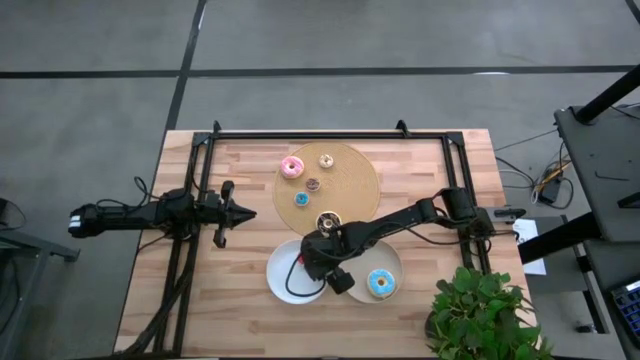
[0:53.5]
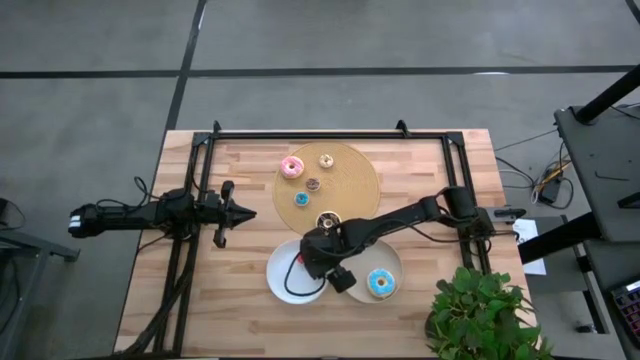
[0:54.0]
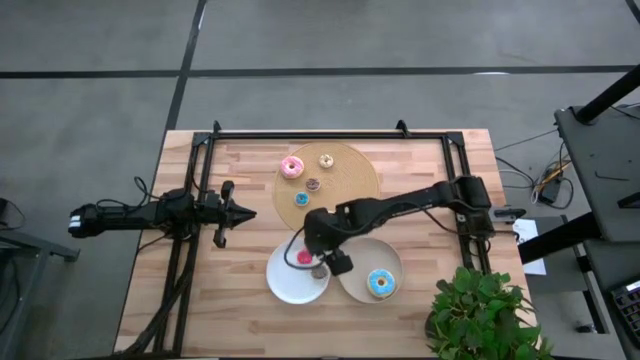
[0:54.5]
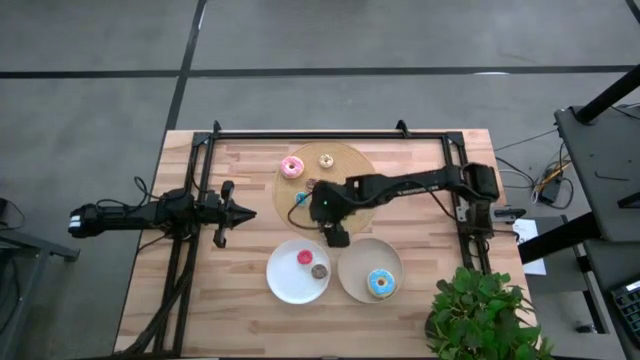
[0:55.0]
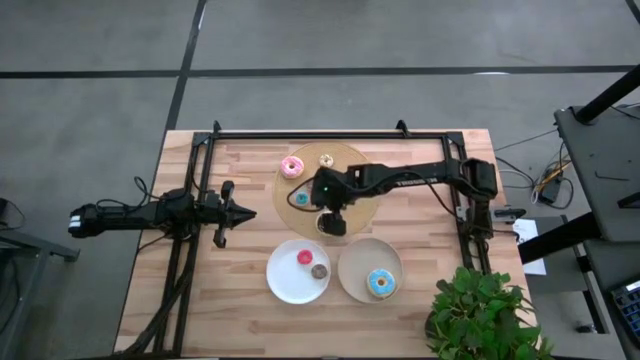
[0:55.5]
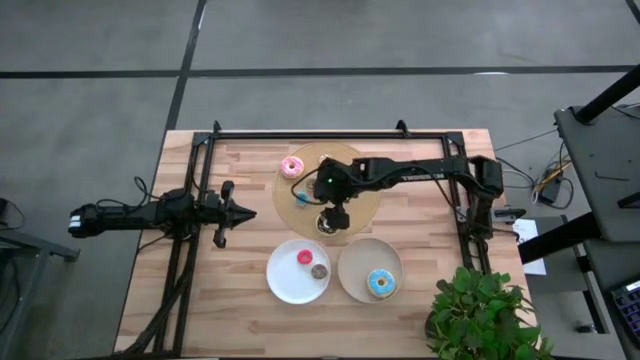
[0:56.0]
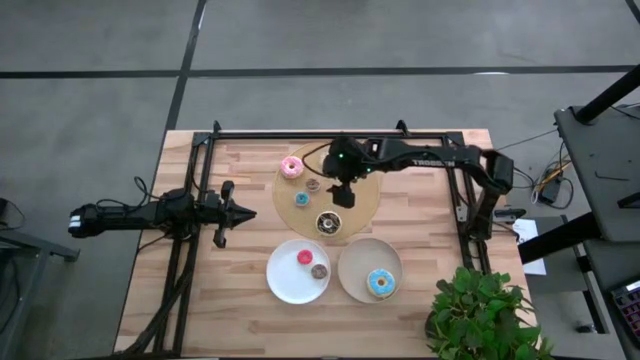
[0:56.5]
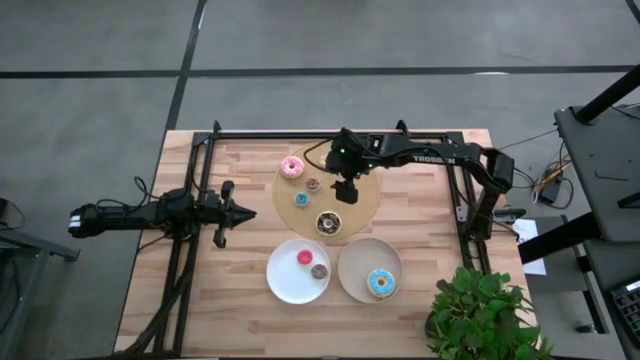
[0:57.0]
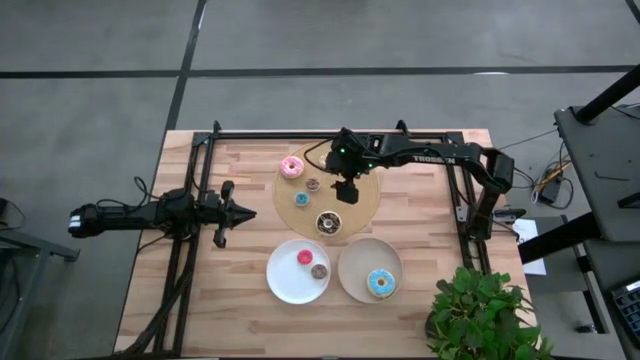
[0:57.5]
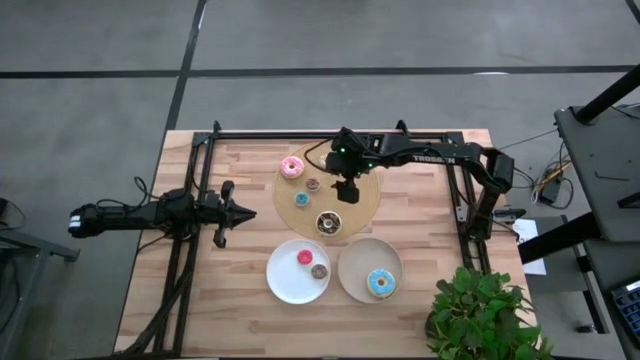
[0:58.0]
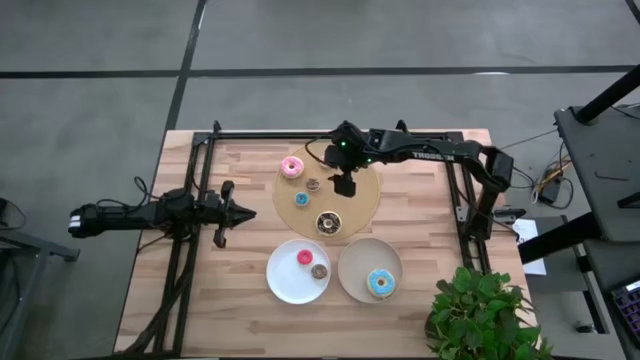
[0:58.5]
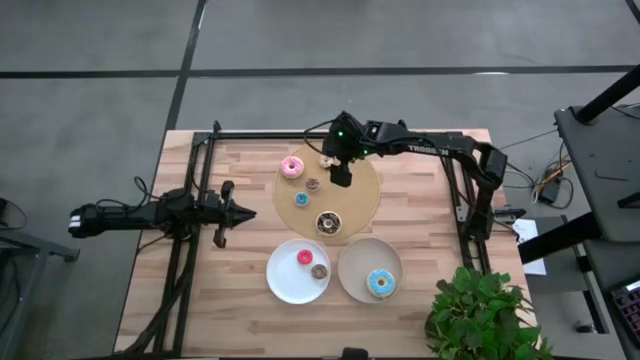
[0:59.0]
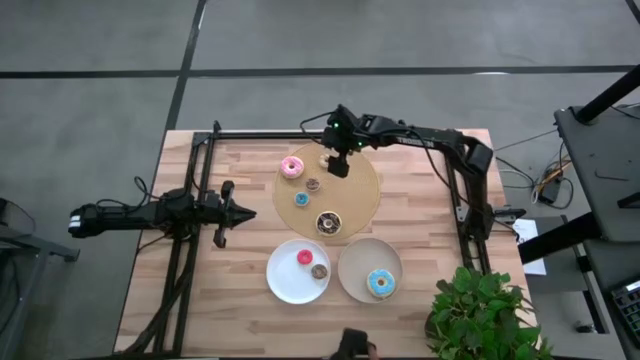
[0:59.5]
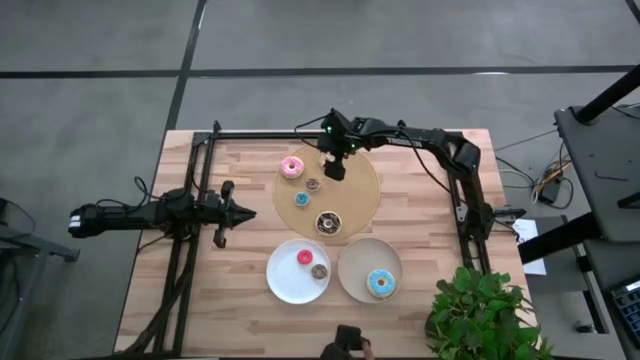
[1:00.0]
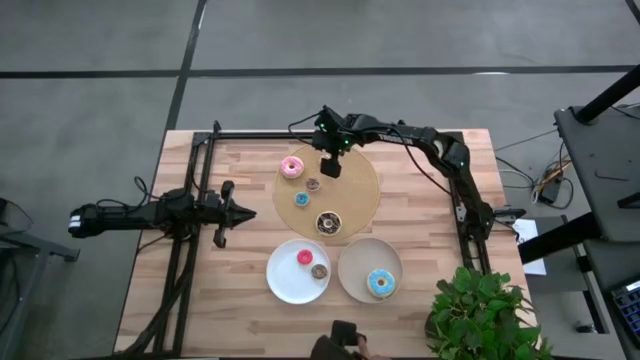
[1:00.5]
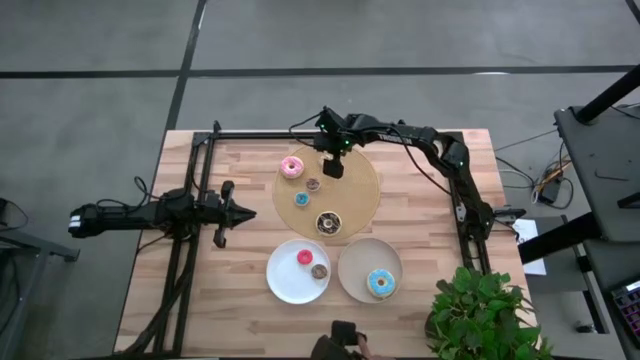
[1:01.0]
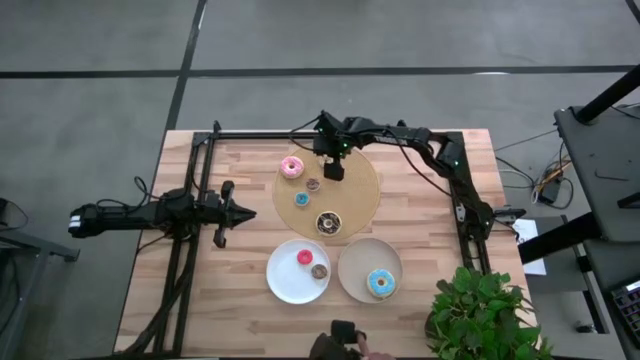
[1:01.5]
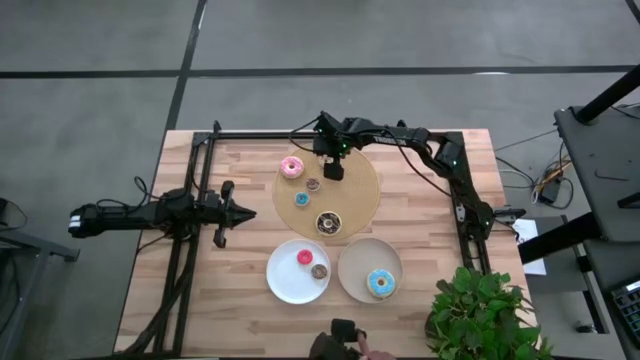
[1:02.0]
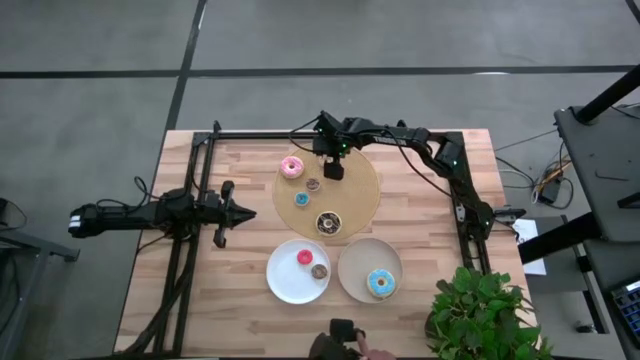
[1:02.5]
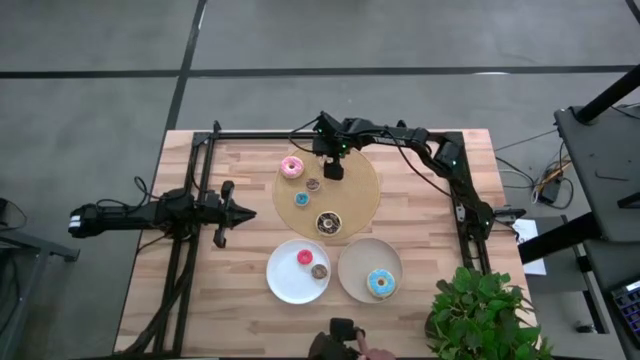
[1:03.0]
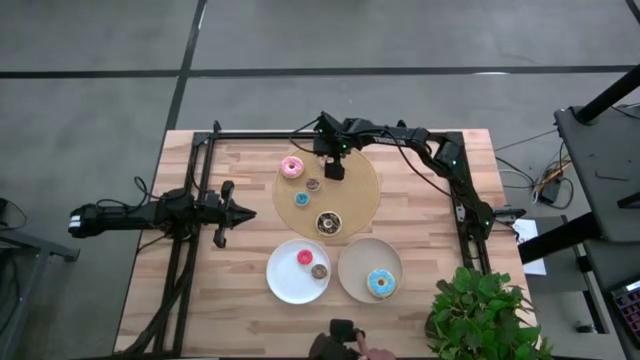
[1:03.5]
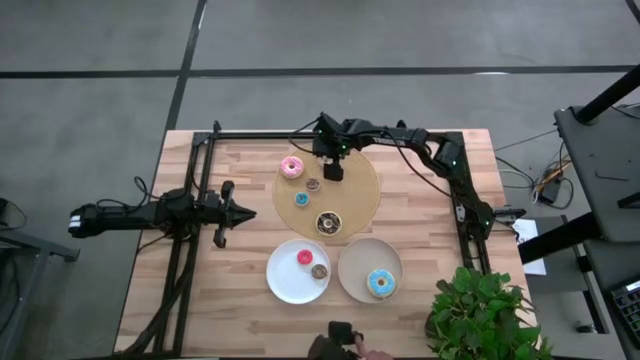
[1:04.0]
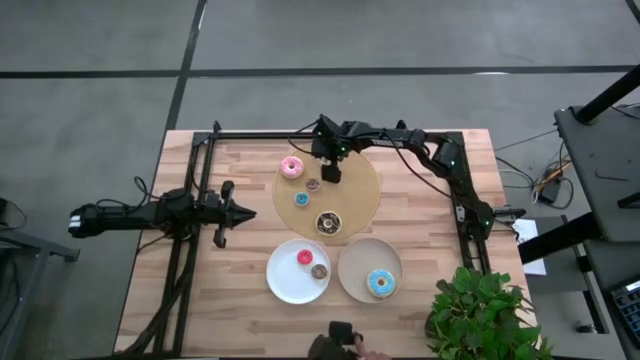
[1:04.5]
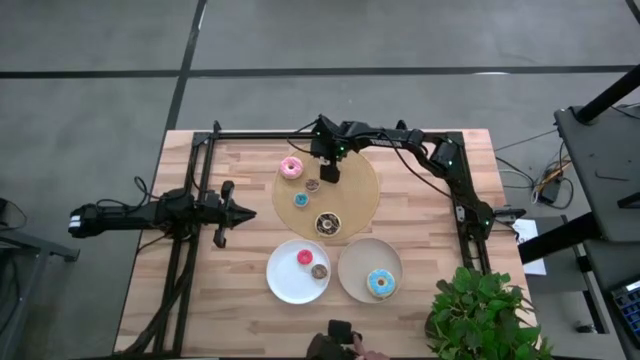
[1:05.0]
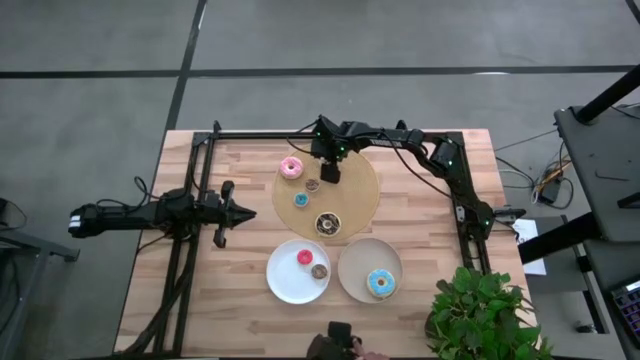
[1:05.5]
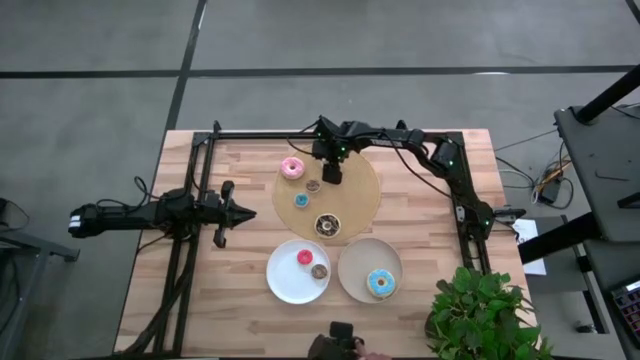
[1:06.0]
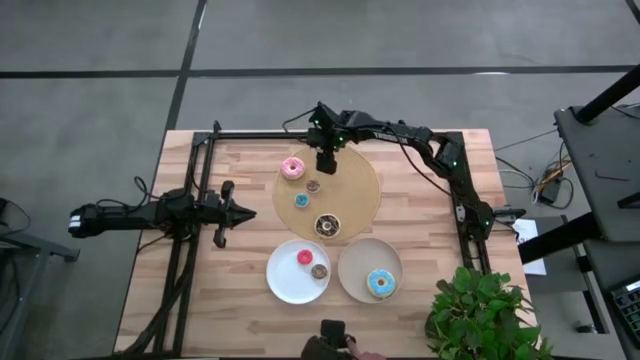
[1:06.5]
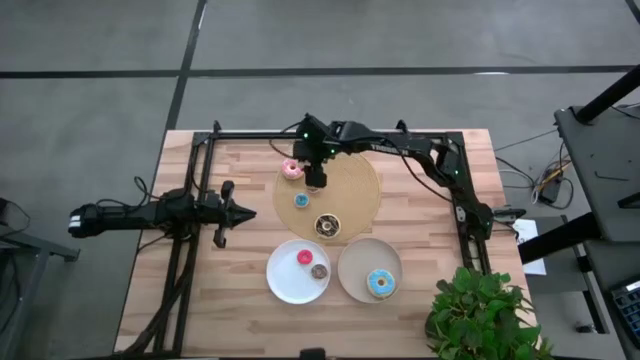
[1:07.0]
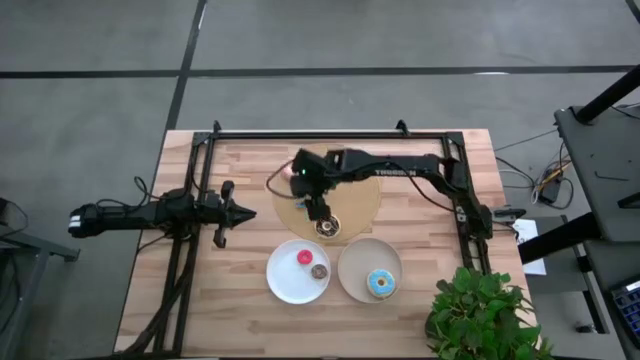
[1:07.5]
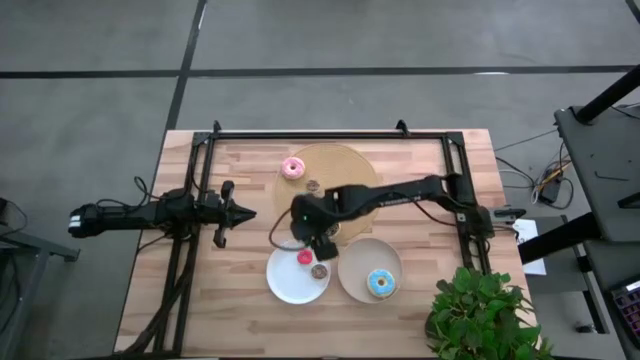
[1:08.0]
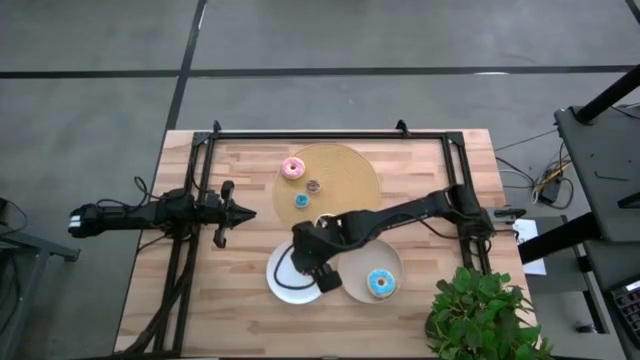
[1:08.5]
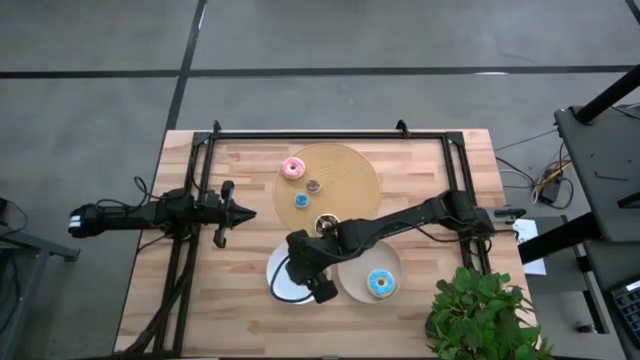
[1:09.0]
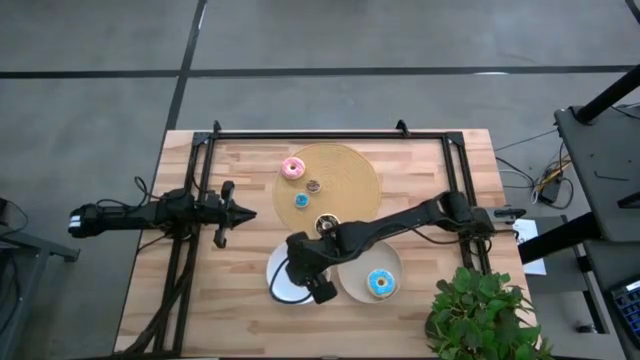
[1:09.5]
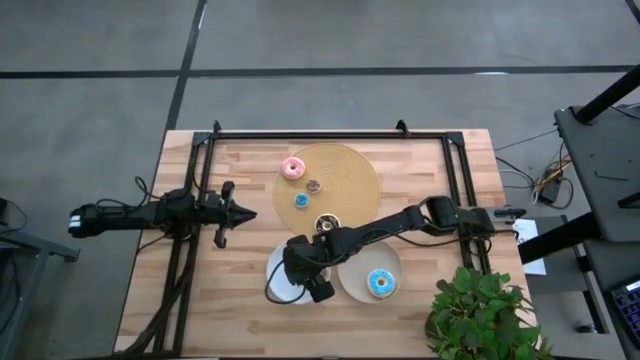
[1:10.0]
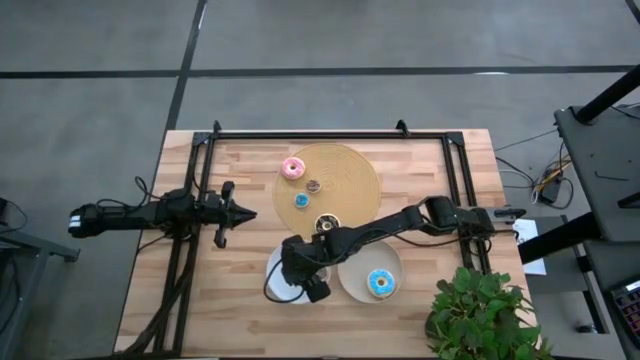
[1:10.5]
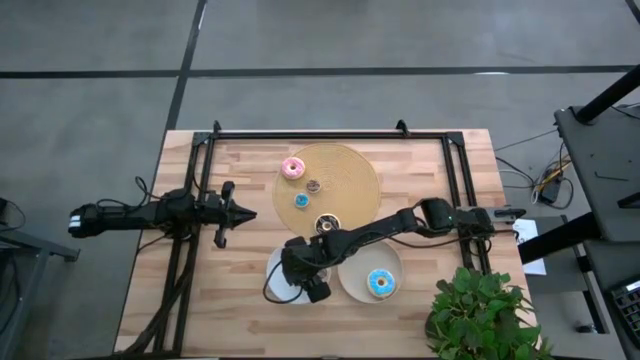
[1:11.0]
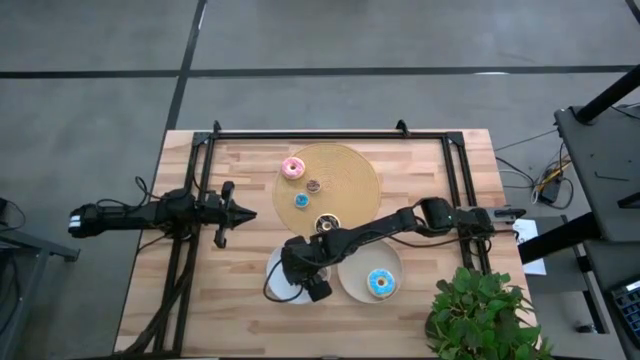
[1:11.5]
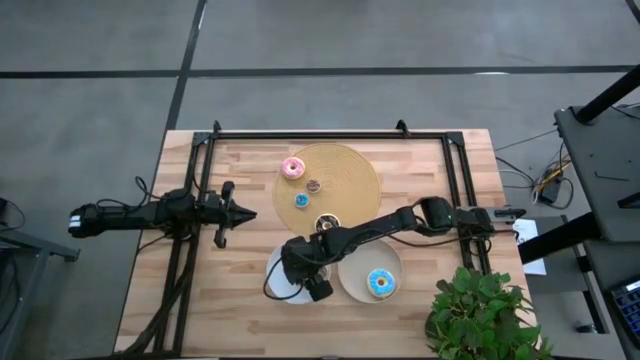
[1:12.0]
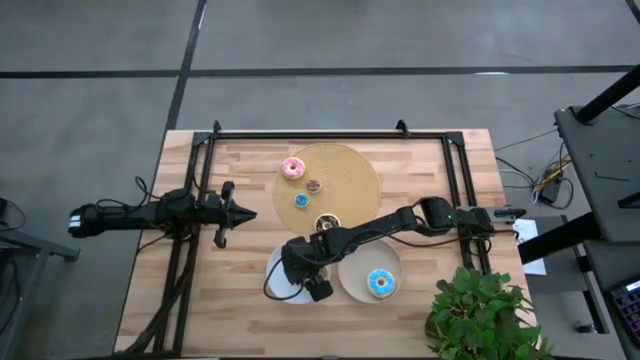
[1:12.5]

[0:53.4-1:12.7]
Task: Pick & Place donuts
Put the small white donut on the white plate

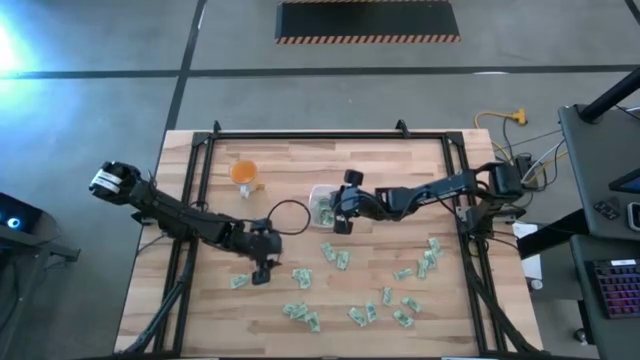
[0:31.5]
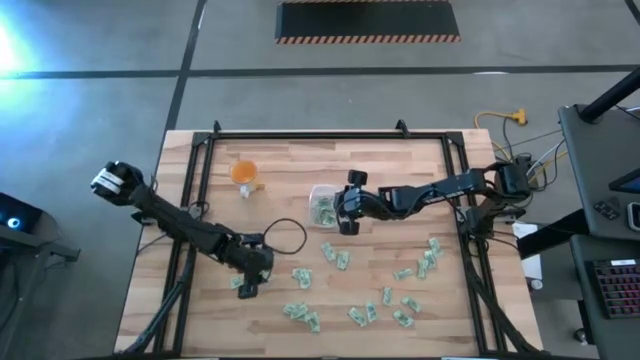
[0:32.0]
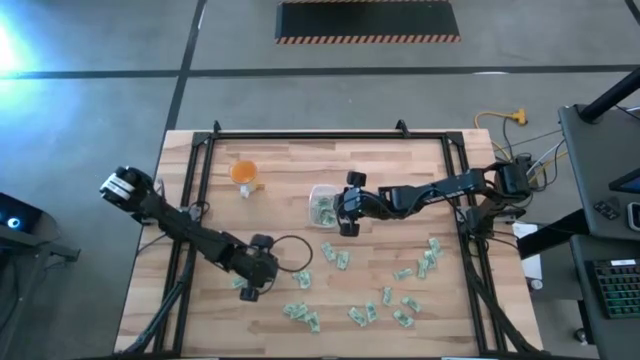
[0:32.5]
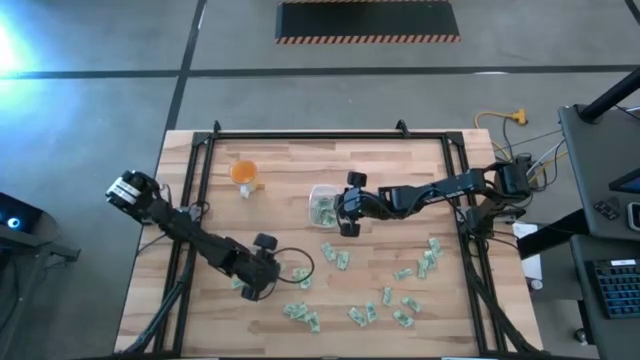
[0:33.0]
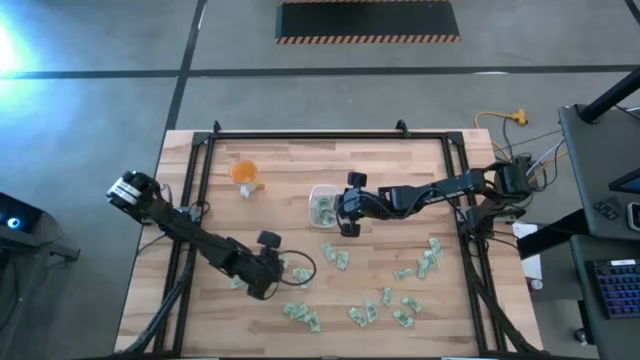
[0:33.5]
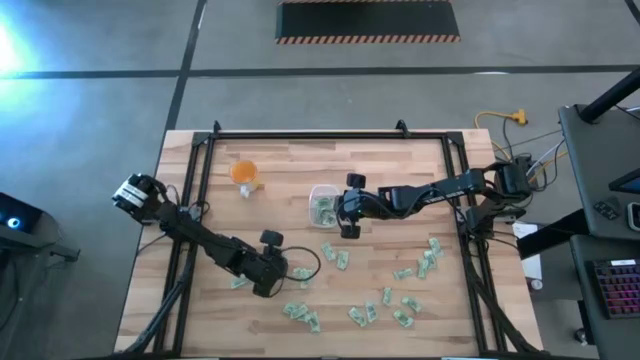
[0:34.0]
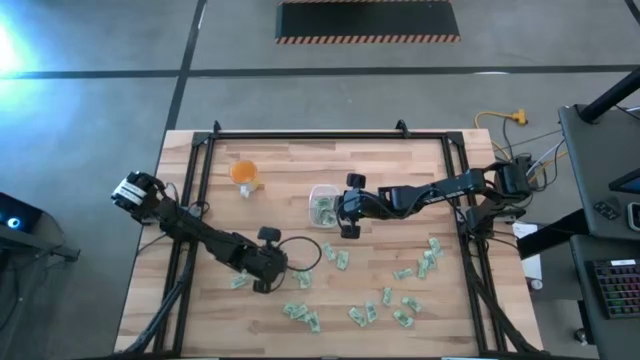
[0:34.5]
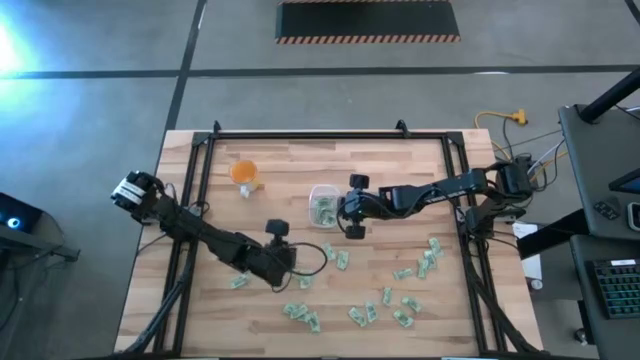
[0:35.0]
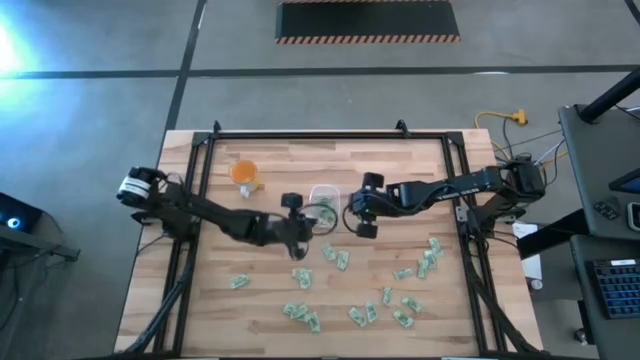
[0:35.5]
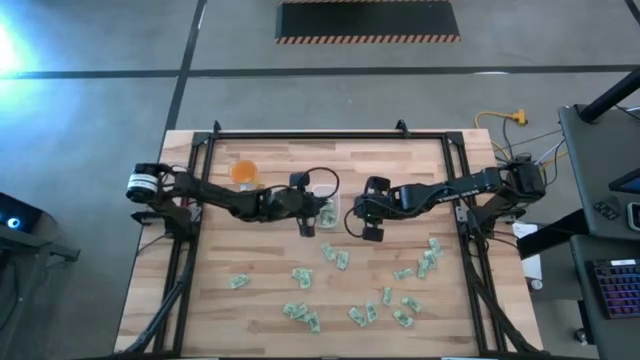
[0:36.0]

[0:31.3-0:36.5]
Task: Pick and place Stevia / Truvia into bins
Put the stevia packet into the bin
